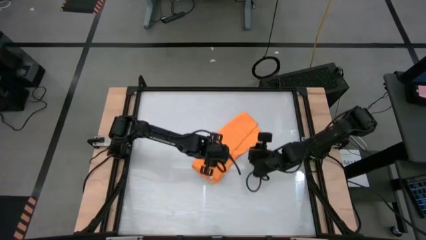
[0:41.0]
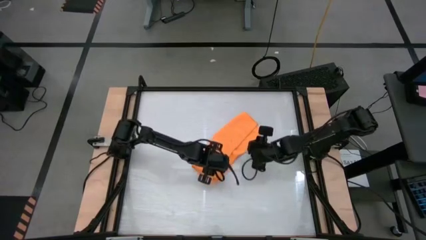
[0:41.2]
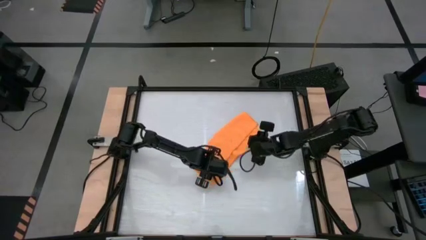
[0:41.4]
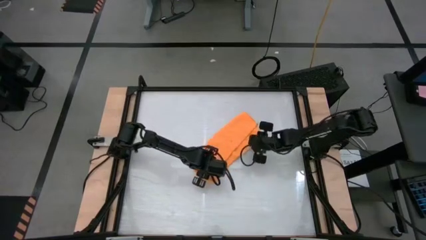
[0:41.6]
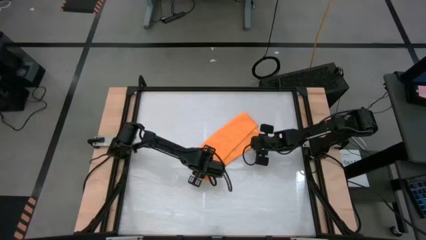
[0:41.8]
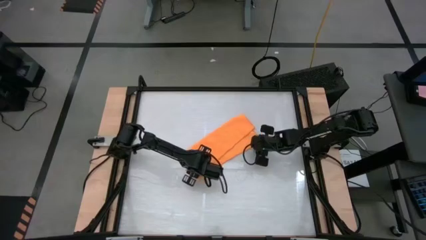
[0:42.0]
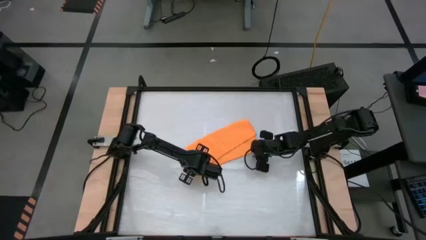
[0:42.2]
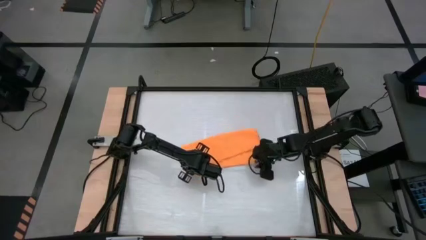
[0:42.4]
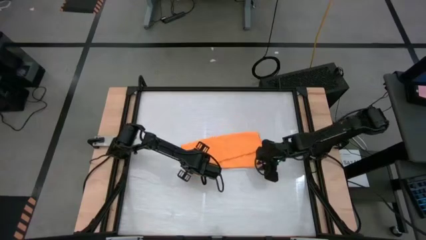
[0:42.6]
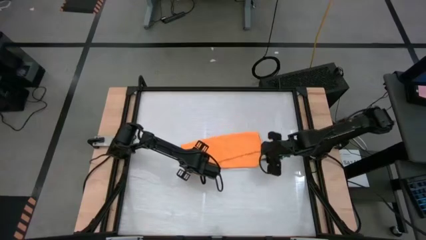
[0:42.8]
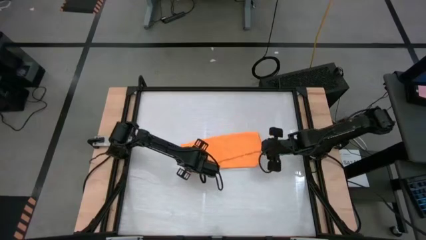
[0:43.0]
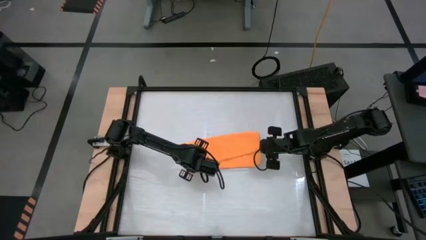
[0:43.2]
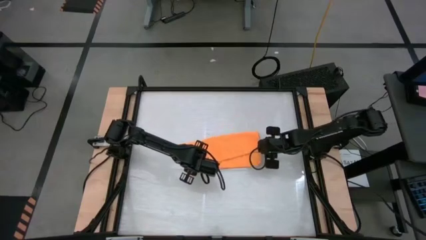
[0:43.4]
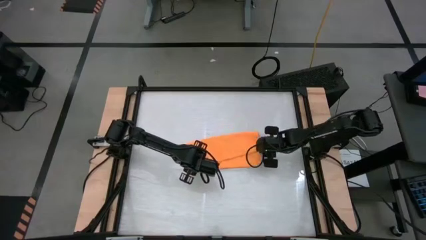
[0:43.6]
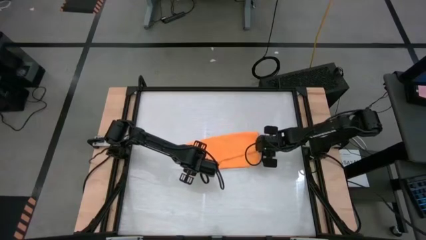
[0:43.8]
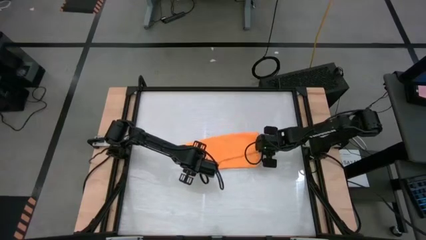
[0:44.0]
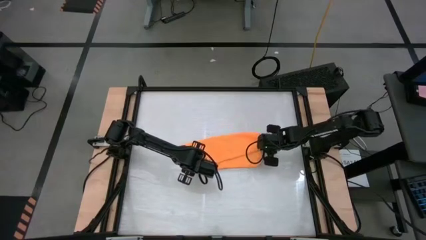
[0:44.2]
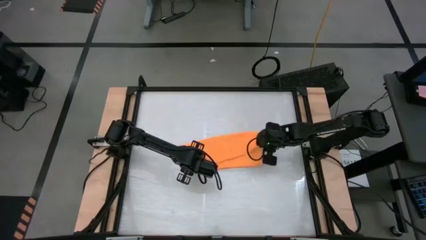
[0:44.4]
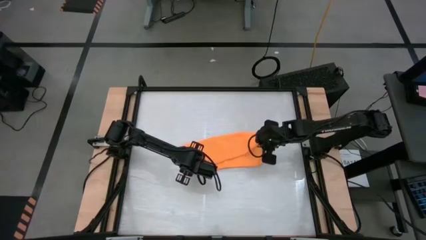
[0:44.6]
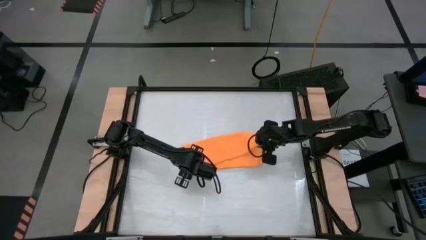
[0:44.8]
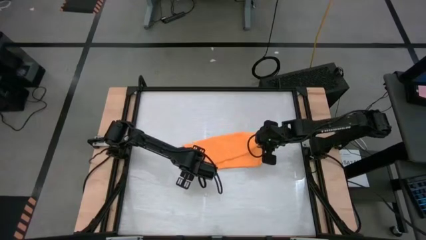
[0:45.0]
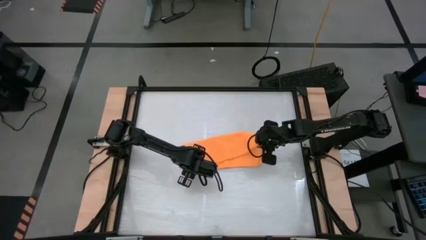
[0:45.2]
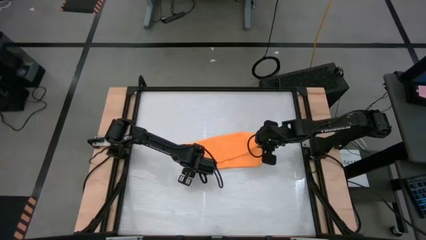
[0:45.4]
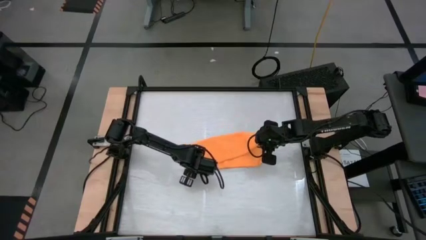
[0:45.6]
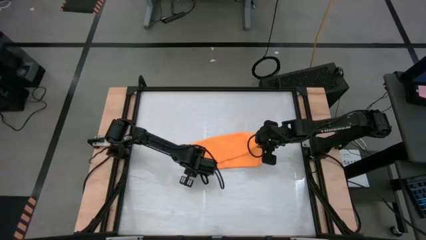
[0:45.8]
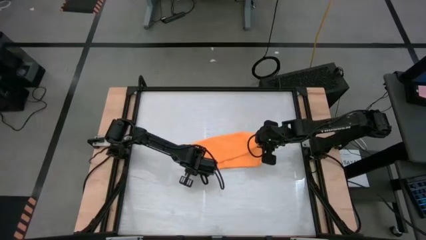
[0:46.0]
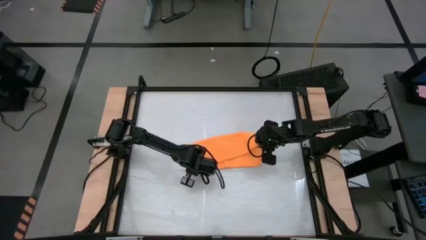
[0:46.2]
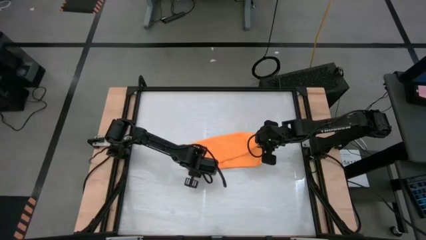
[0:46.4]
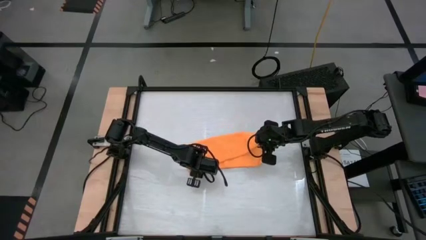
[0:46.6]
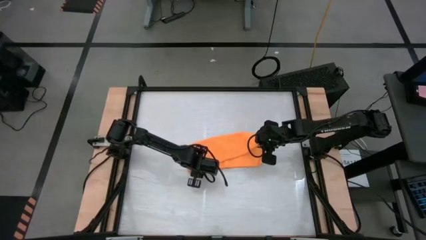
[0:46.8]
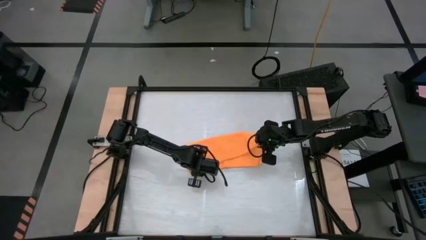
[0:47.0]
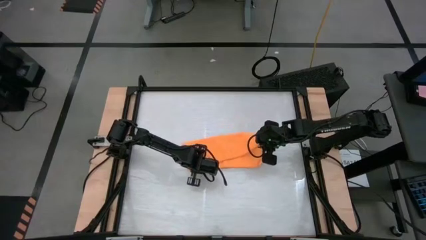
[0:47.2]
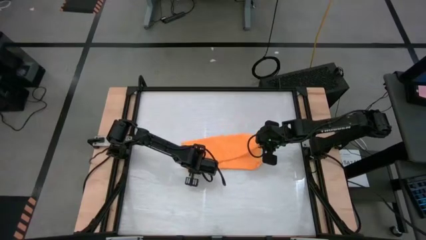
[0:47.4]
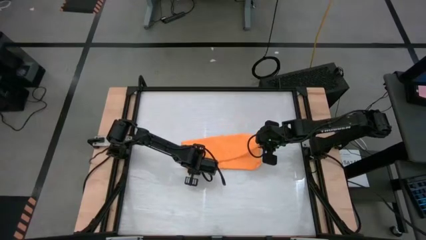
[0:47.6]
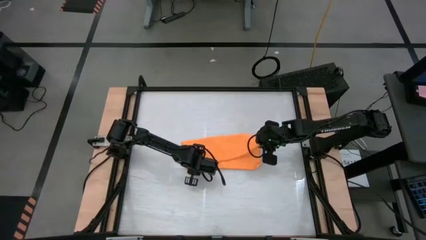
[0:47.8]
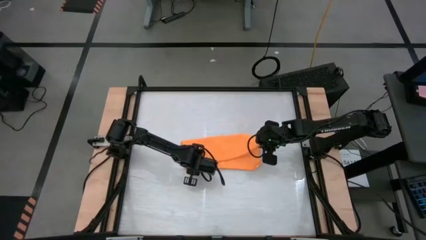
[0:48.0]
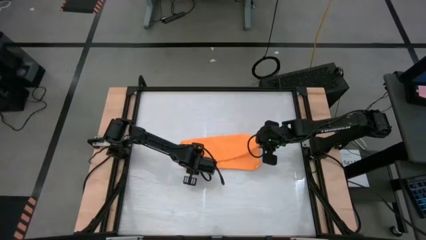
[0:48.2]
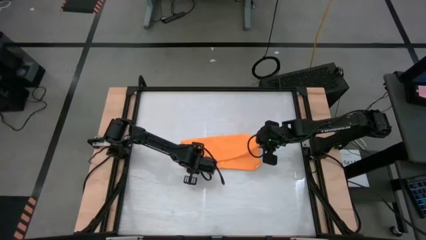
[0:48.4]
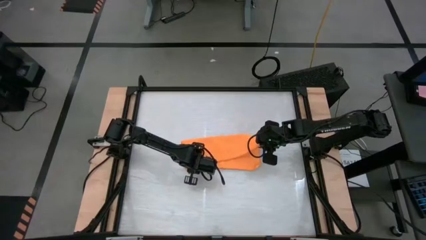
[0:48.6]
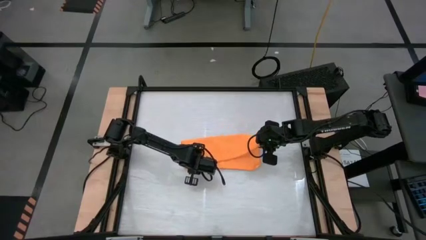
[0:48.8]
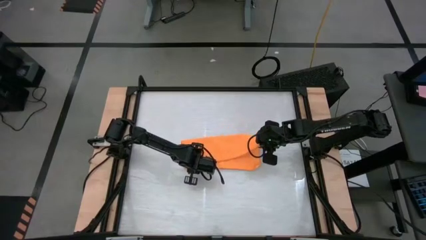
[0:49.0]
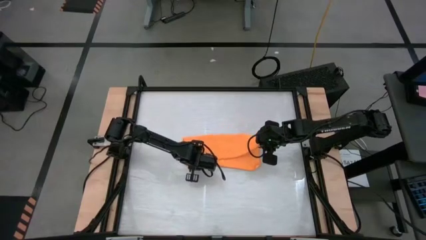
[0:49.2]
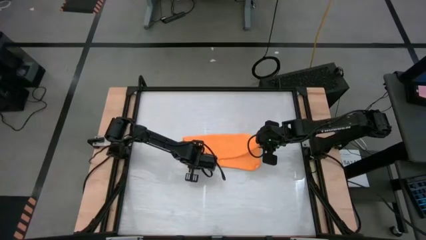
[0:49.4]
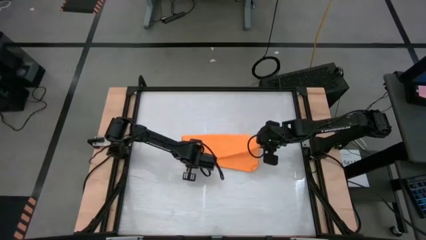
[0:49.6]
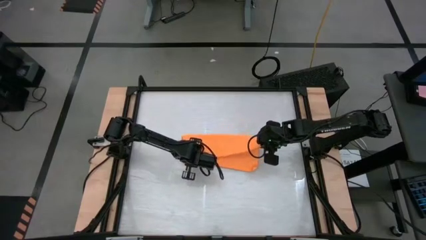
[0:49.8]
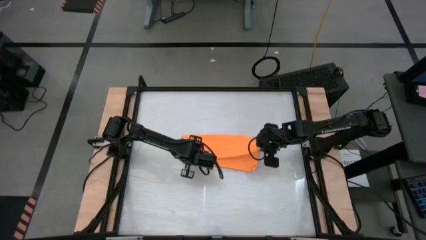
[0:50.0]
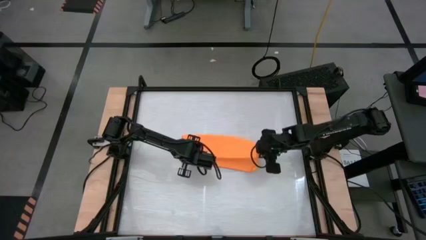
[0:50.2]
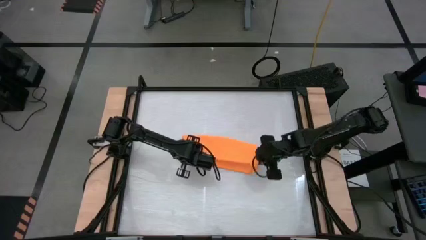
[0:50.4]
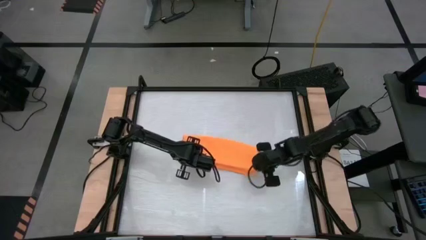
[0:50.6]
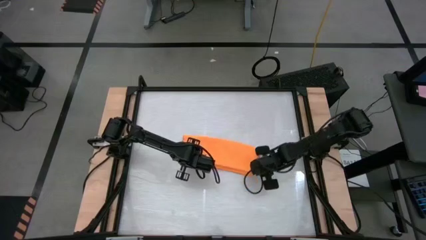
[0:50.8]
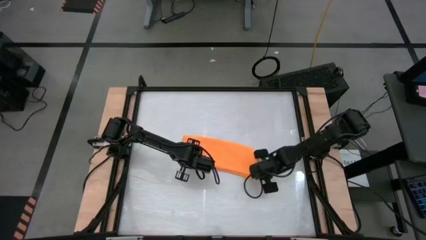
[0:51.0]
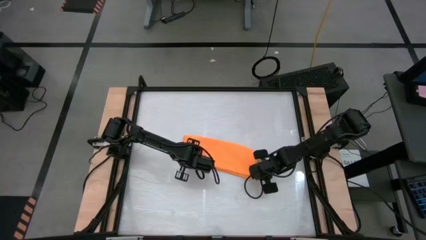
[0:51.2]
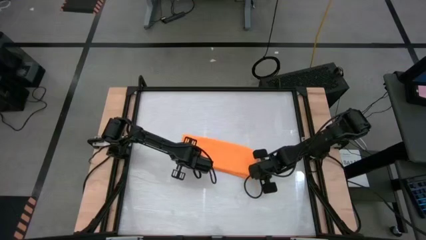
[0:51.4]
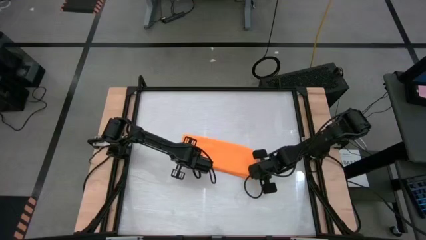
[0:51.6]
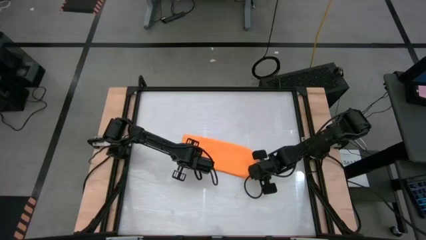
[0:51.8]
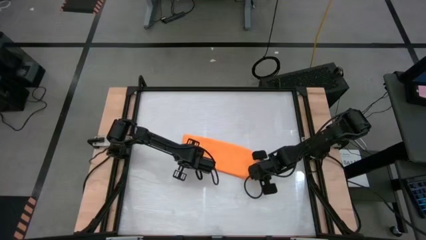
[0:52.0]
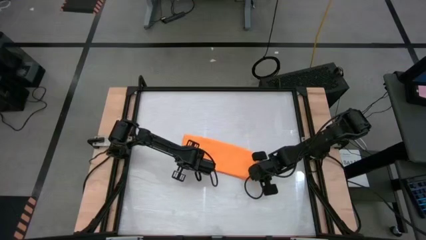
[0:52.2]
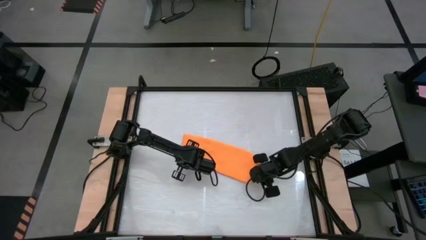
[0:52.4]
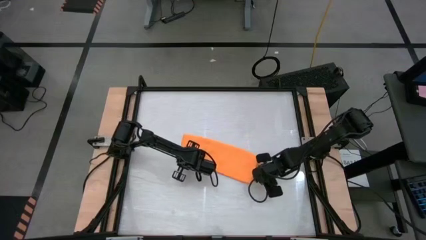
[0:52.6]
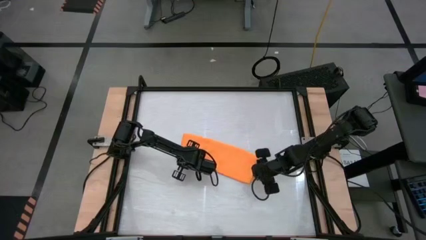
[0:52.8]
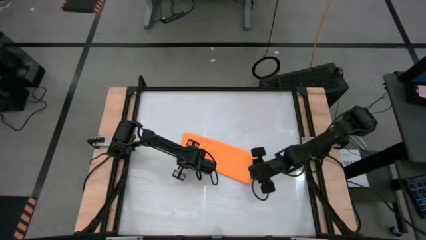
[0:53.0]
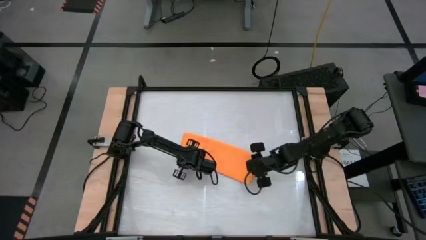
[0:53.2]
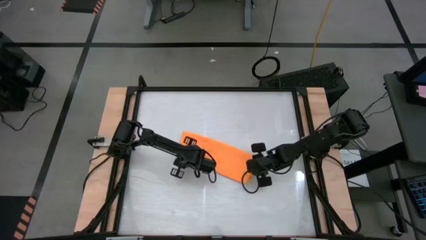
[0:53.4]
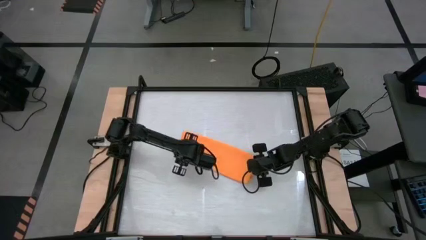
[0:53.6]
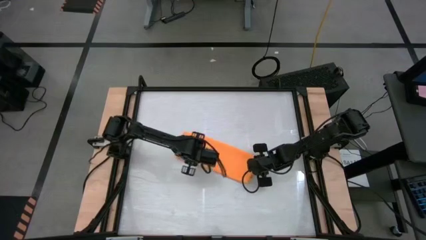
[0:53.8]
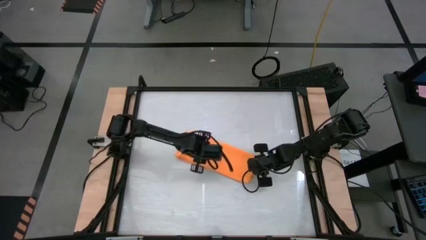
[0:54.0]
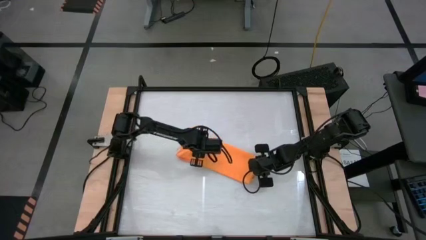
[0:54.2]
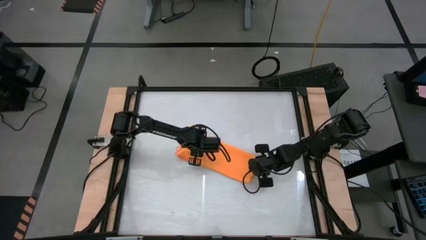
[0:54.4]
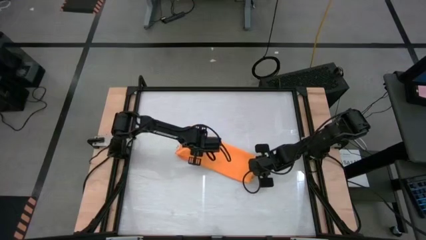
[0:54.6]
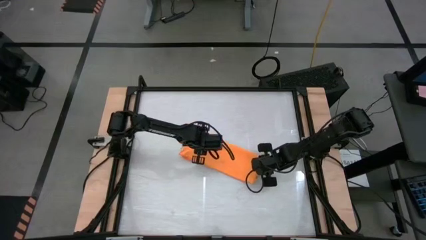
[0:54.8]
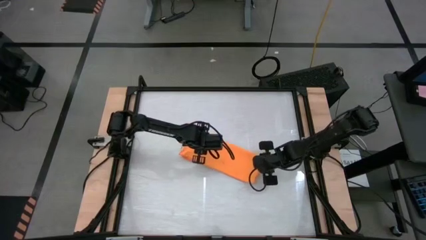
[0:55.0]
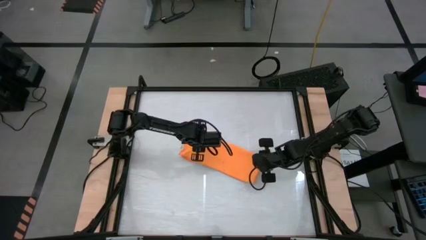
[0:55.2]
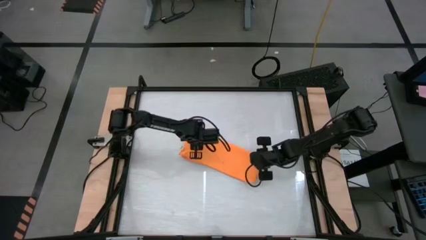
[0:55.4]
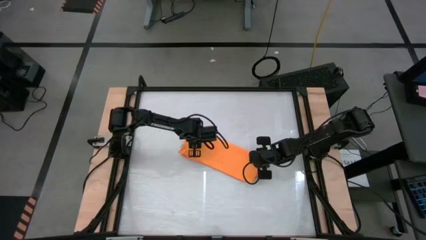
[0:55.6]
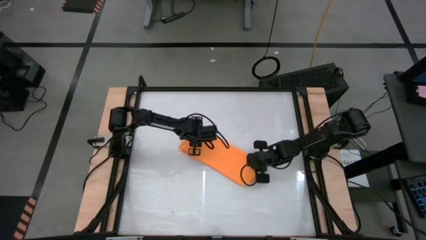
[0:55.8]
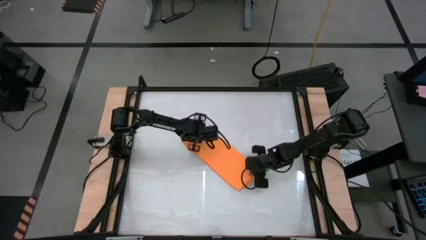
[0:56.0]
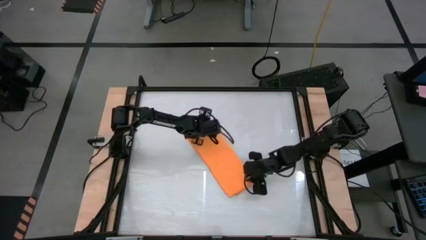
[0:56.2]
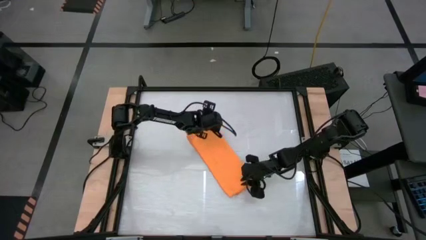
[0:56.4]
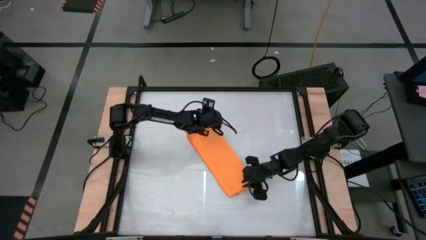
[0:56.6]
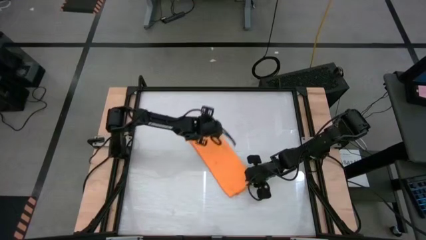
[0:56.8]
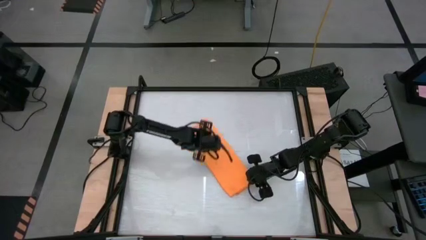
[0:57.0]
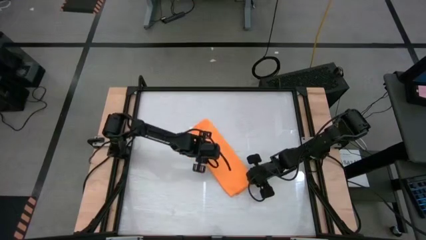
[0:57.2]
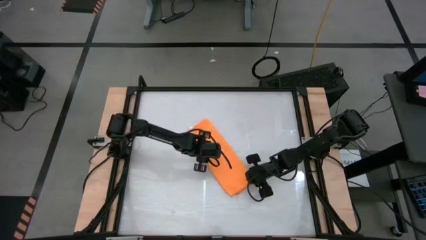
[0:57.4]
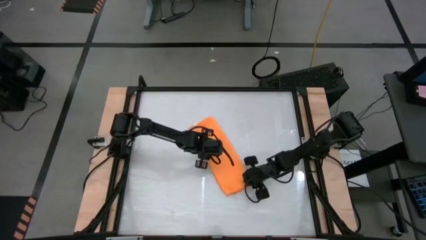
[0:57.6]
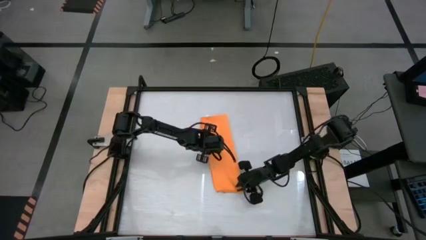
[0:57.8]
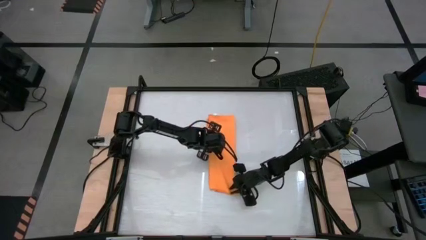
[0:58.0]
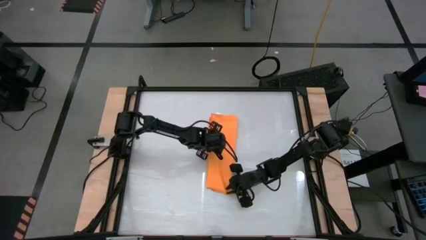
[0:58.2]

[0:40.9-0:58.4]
Task: Roll towel
Fold the orange towel
